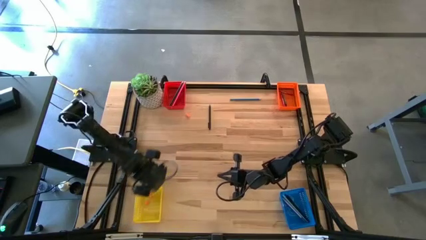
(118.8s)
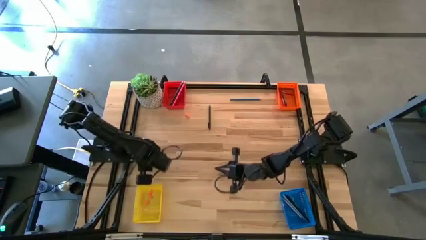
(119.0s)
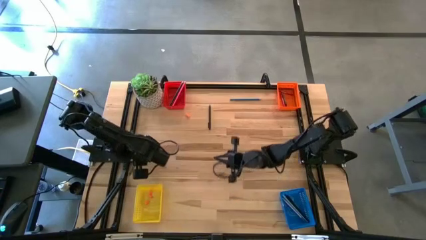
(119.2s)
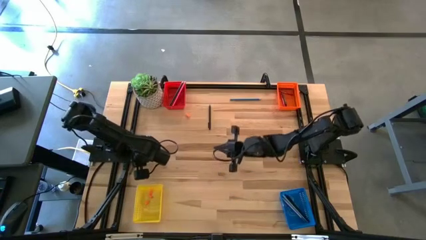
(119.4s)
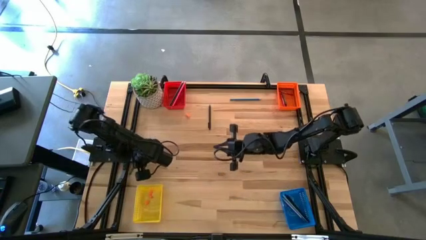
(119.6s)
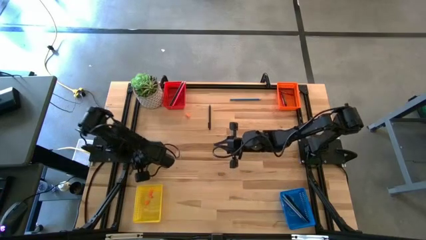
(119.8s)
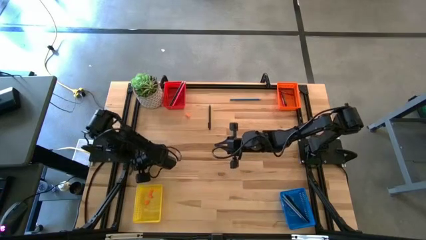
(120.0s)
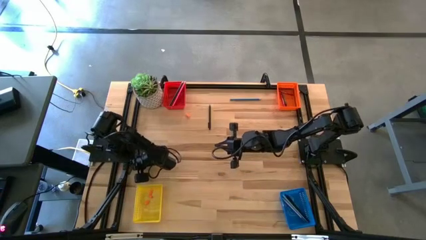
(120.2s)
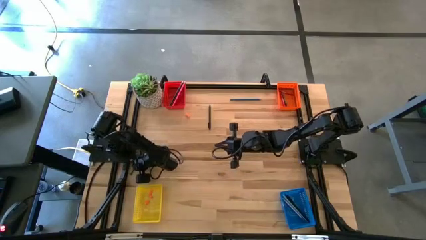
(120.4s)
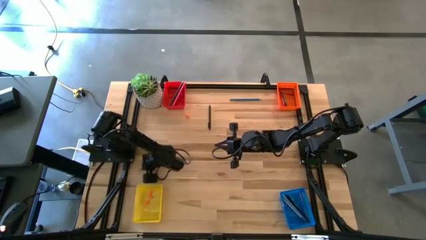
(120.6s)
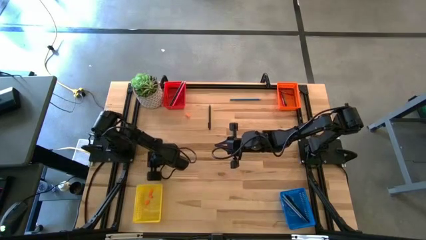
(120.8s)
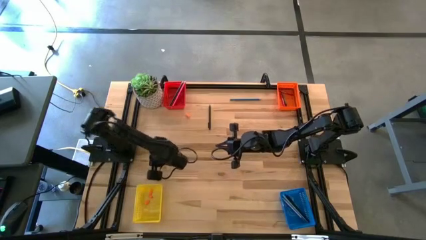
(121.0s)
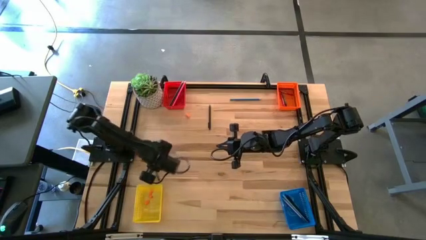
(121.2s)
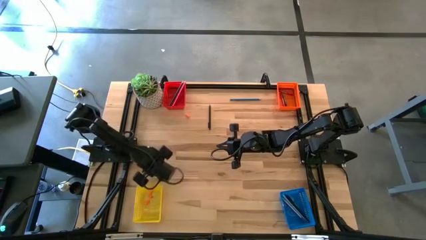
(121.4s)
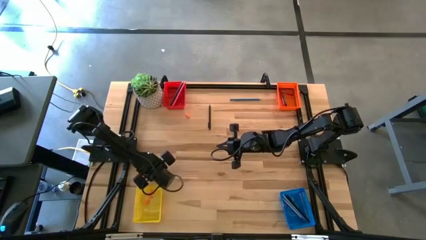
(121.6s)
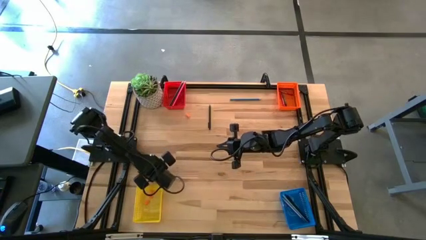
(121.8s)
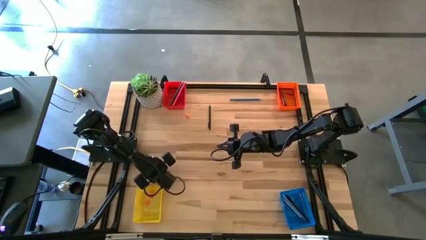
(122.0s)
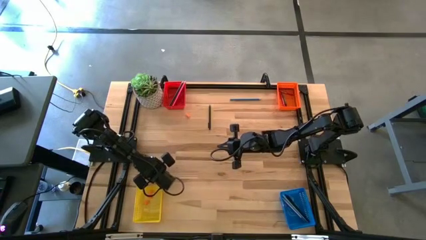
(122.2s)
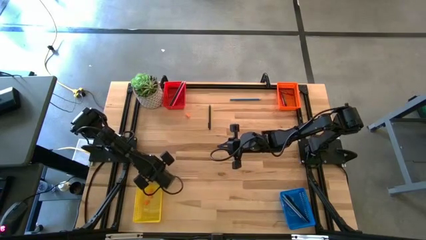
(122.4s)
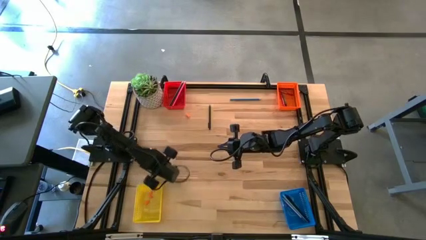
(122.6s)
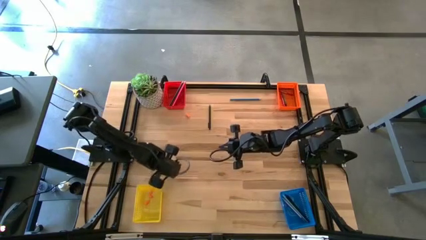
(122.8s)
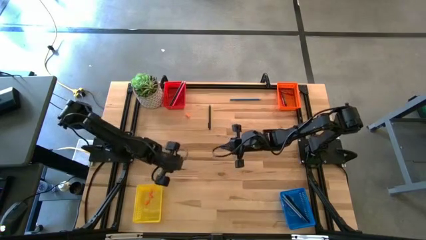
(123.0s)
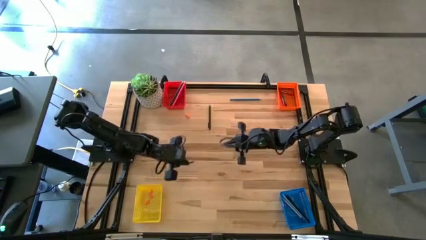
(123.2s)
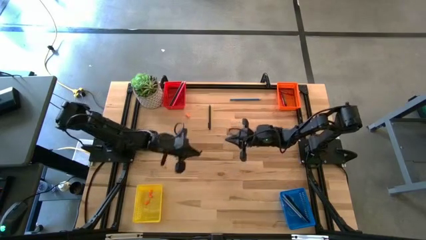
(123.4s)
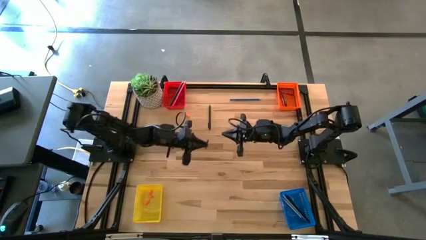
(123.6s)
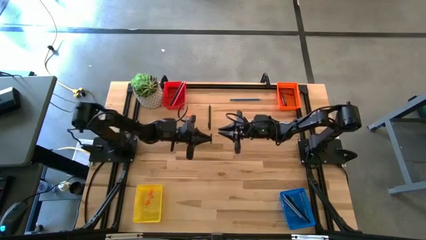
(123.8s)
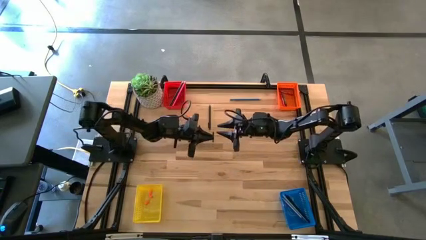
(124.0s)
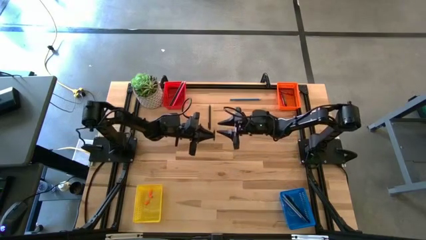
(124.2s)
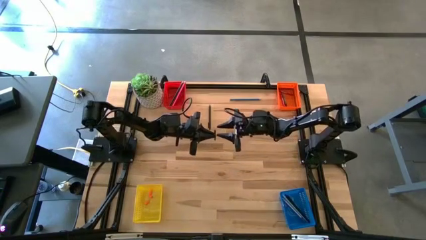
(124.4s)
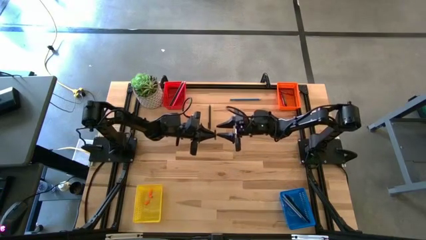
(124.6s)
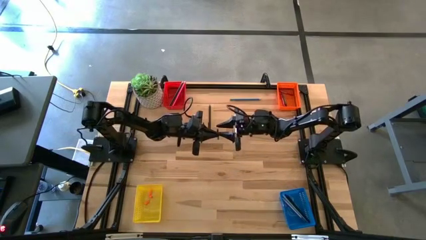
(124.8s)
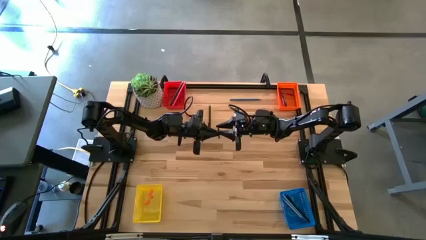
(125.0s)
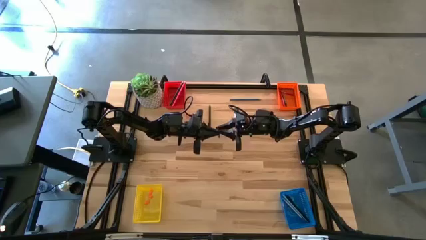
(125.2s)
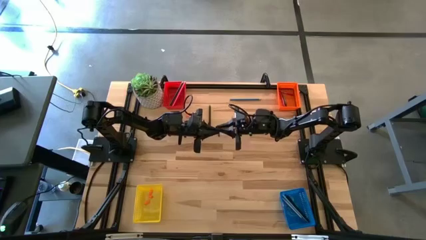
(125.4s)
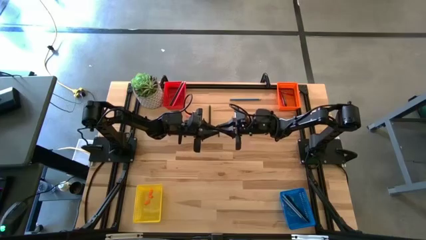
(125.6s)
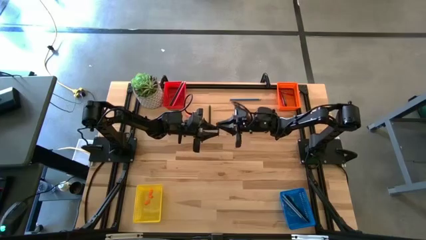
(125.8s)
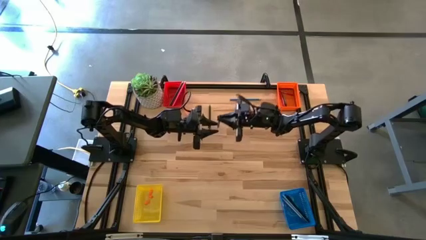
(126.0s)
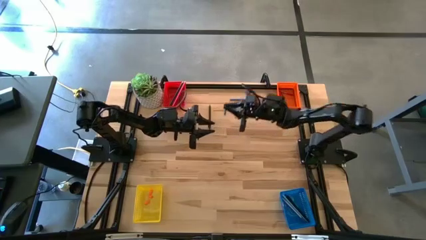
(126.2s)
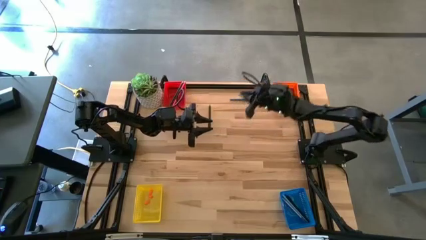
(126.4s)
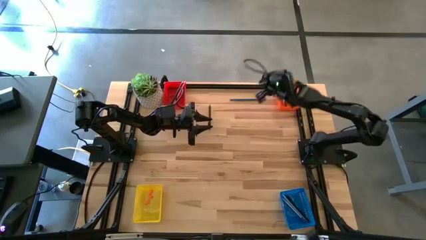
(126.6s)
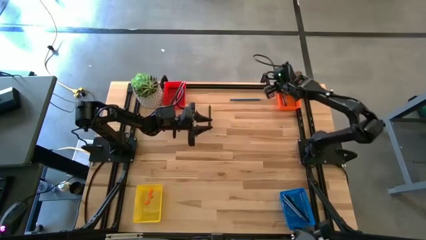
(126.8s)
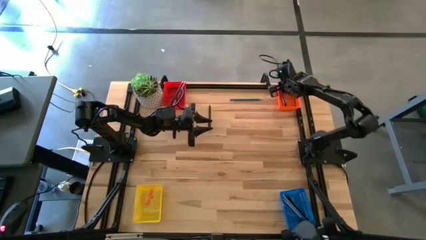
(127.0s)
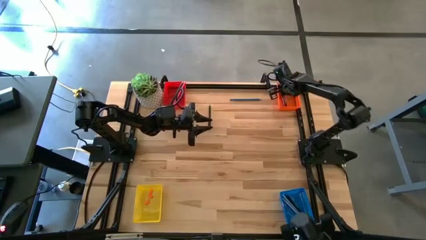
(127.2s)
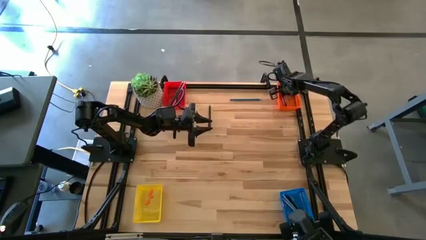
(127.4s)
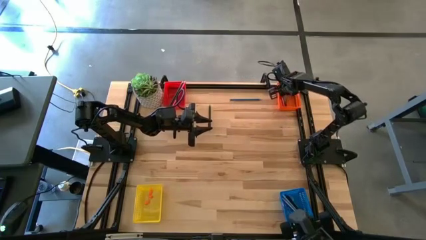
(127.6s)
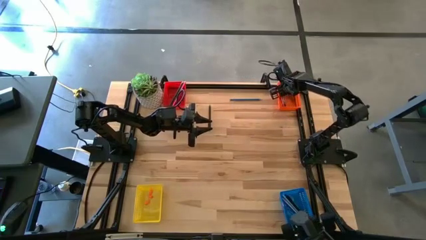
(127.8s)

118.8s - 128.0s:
Task: Sort crayons/erasers/pens/pencils in bins
Put the green crayon into the orange bin

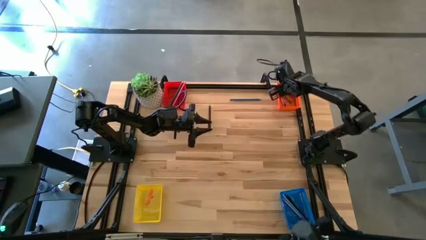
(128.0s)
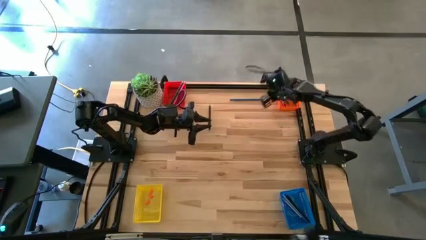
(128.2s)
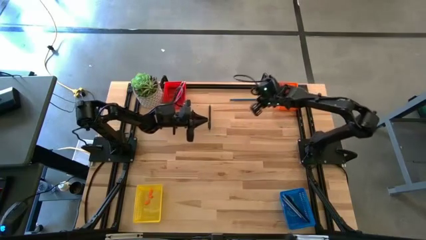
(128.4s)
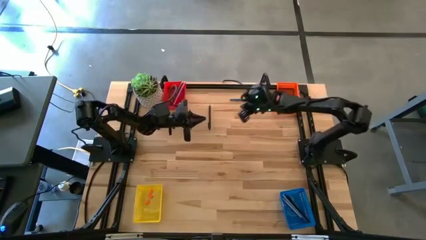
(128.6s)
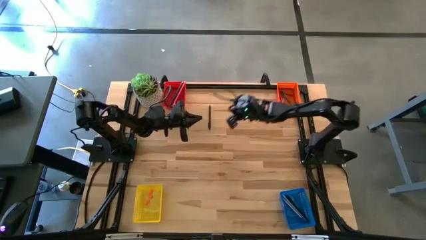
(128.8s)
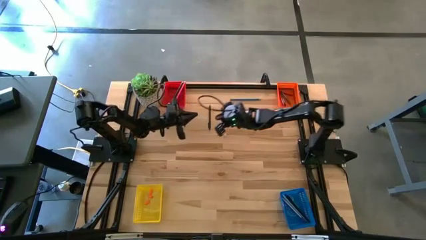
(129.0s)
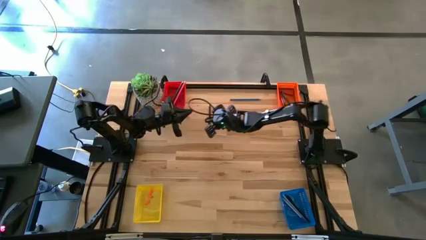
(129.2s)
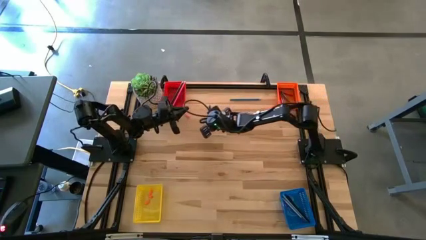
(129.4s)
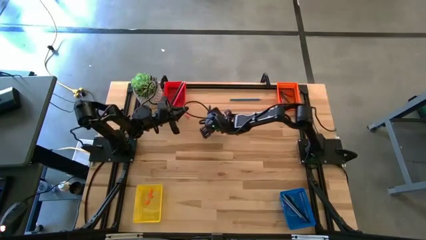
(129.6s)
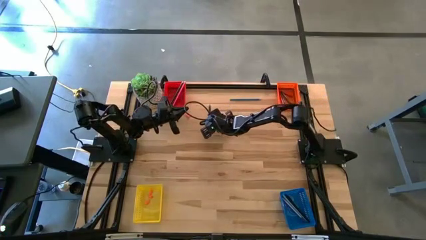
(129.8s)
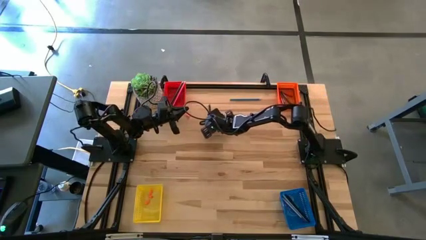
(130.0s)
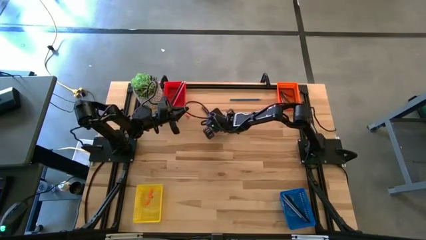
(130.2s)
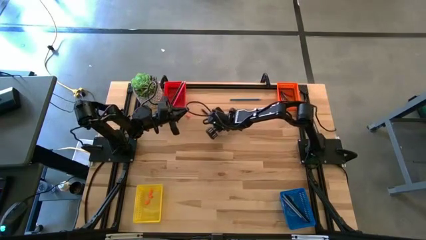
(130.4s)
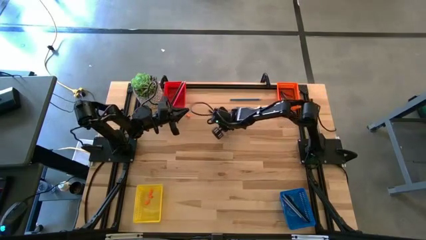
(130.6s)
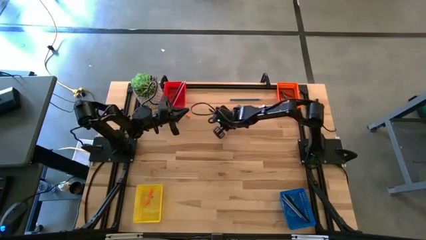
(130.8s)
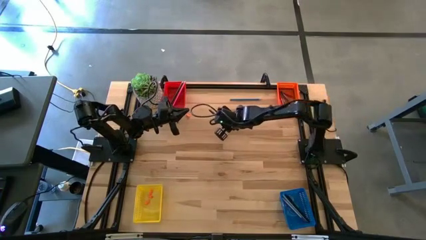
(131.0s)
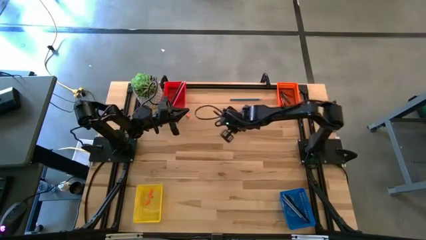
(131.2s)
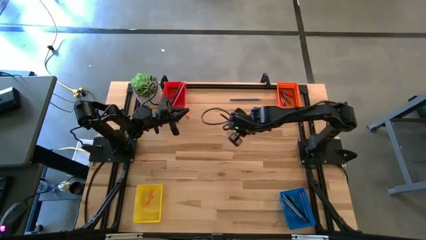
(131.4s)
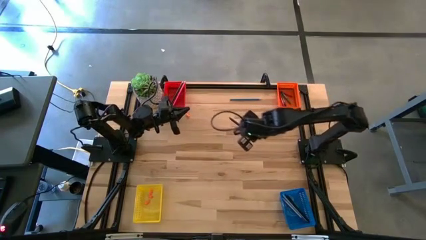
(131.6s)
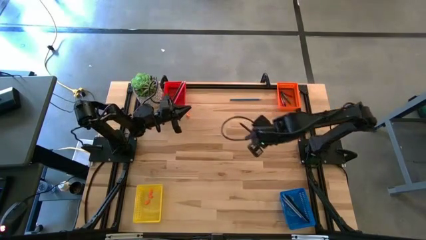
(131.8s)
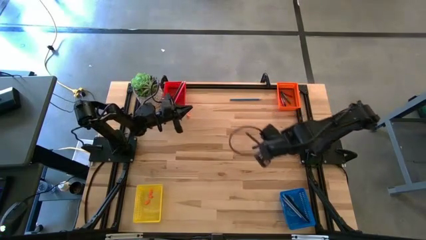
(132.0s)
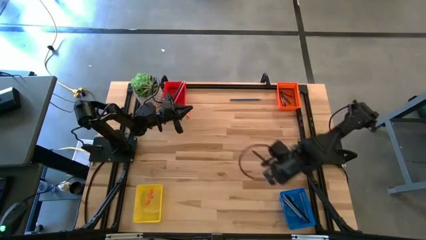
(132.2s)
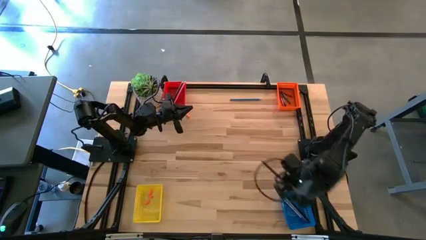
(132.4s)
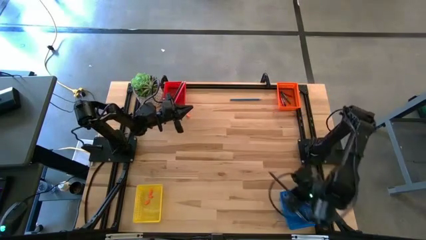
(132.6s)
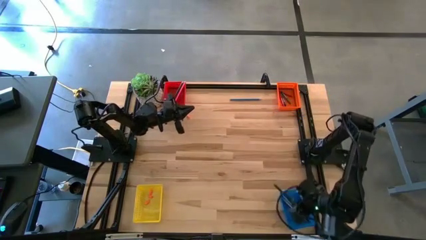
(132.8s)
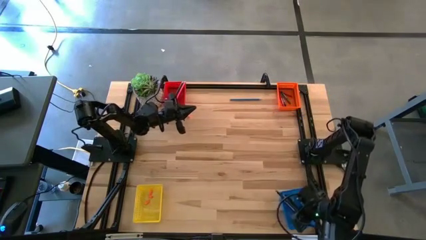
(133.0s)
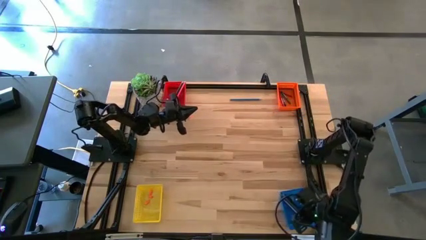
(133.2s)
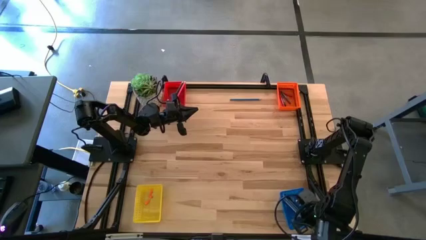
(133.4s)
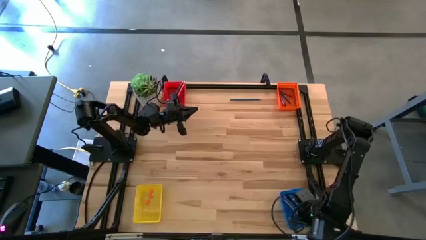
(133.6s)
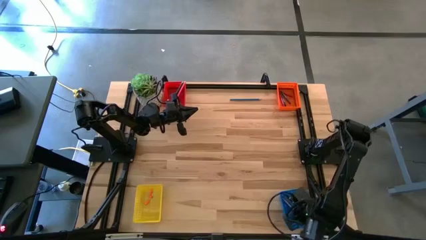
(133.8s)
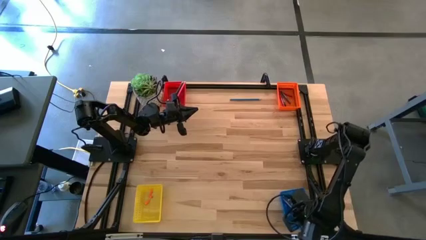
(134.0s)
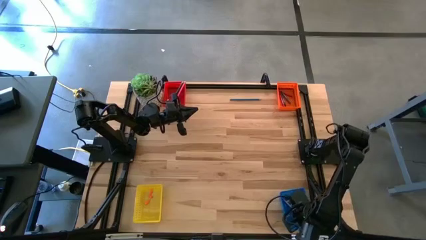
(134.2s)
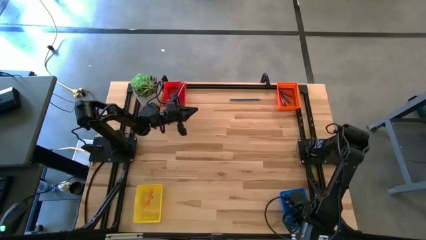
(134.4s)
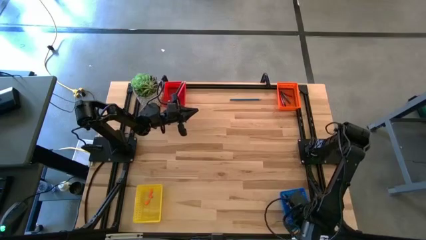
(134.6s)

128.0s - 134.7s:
Put the black pen into the blue bin
